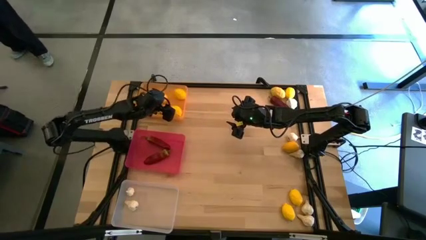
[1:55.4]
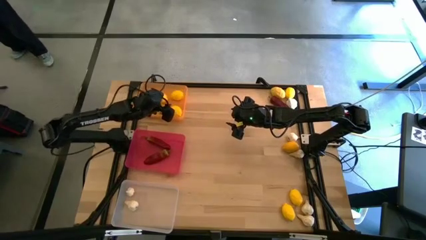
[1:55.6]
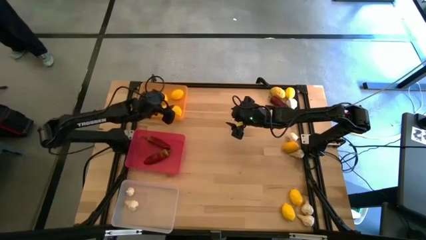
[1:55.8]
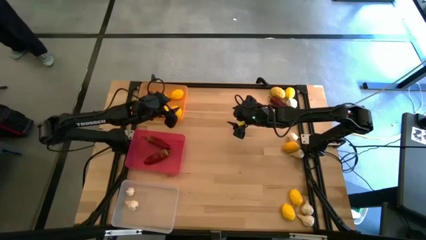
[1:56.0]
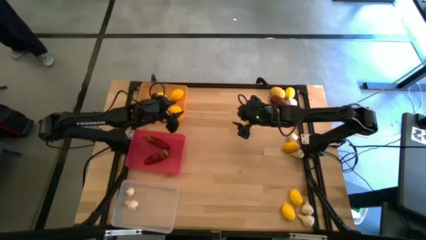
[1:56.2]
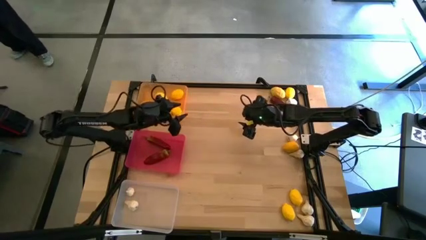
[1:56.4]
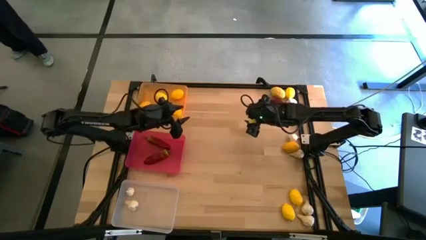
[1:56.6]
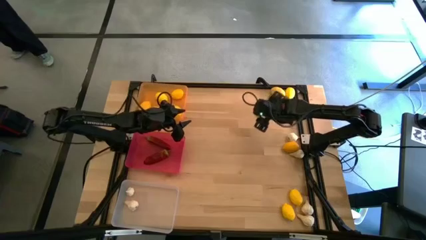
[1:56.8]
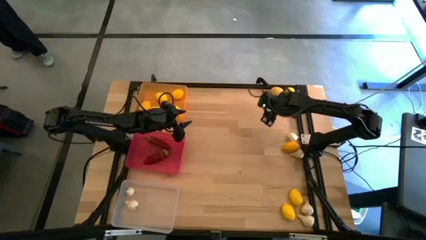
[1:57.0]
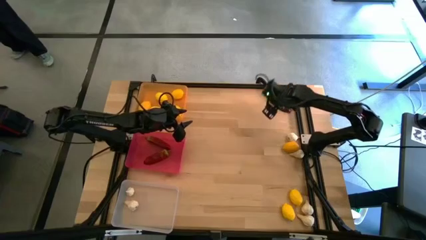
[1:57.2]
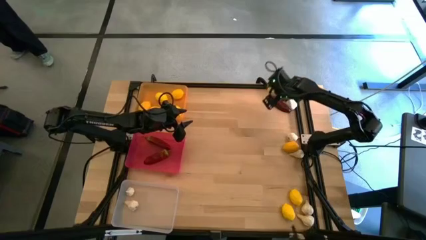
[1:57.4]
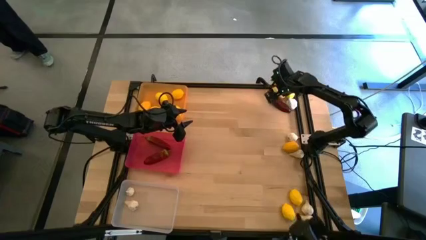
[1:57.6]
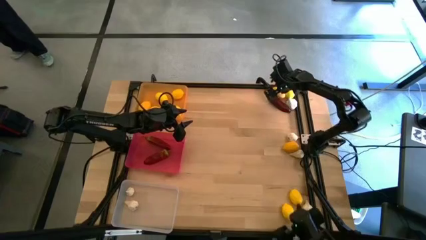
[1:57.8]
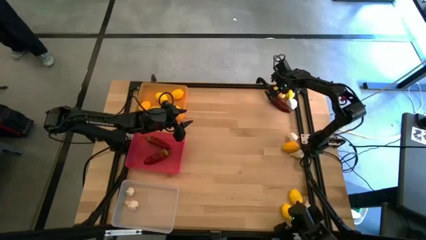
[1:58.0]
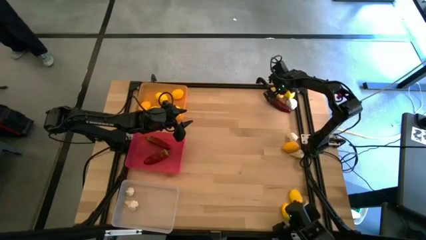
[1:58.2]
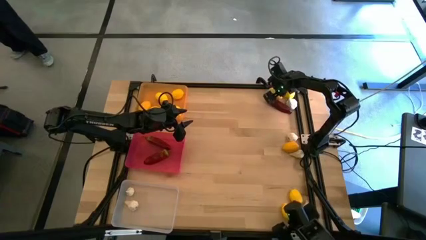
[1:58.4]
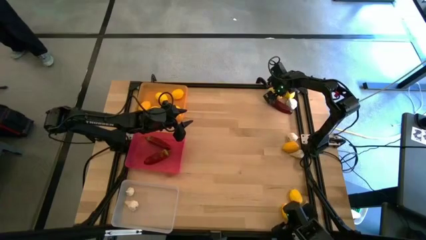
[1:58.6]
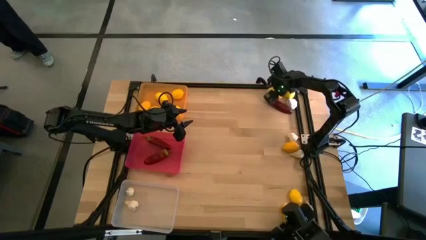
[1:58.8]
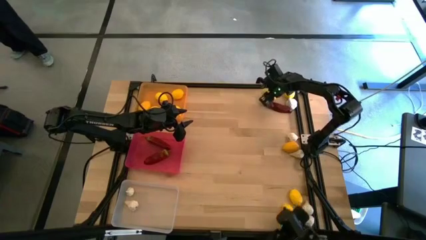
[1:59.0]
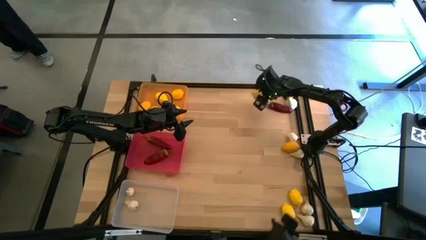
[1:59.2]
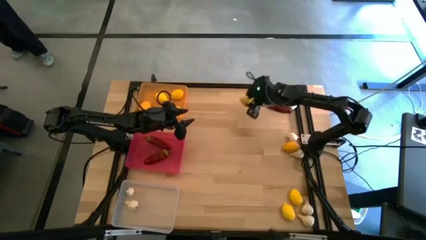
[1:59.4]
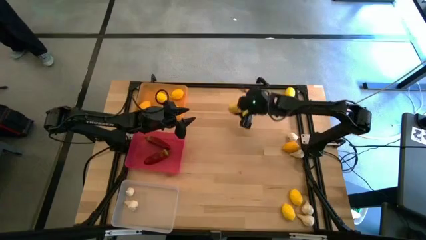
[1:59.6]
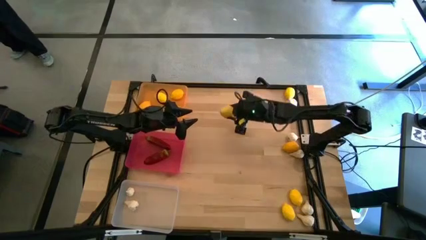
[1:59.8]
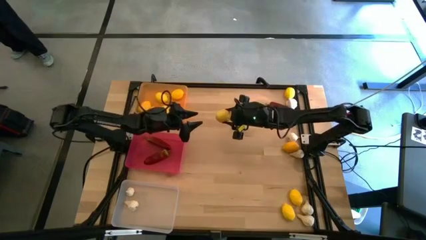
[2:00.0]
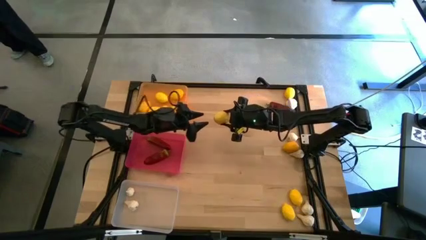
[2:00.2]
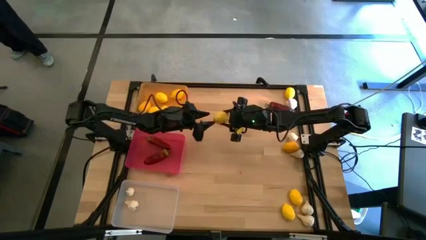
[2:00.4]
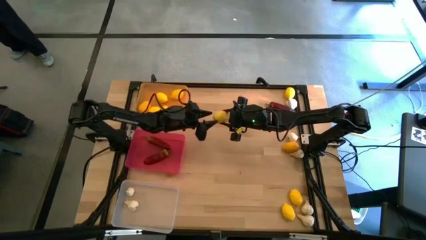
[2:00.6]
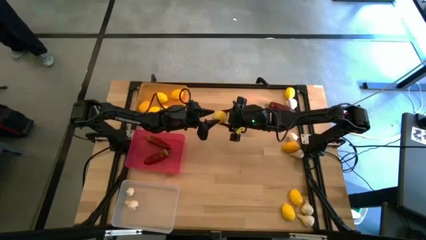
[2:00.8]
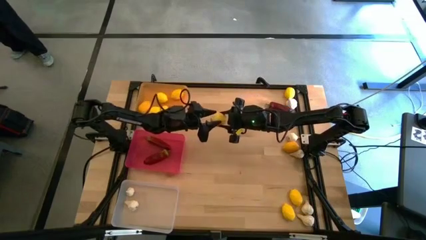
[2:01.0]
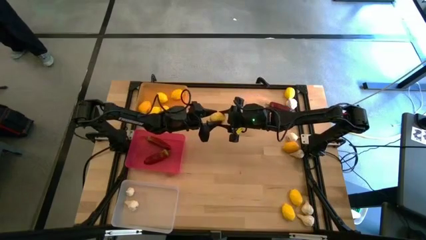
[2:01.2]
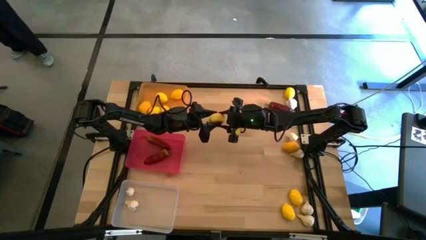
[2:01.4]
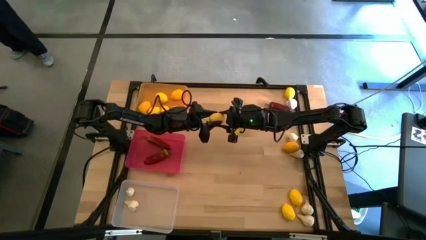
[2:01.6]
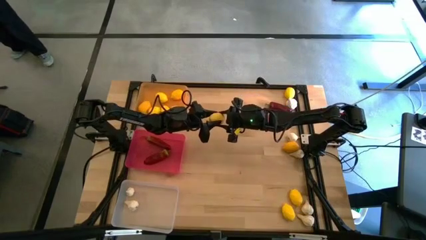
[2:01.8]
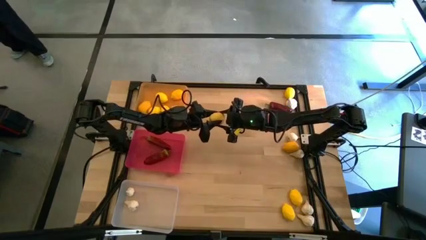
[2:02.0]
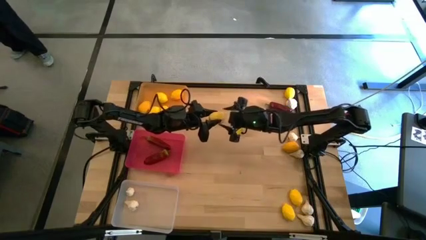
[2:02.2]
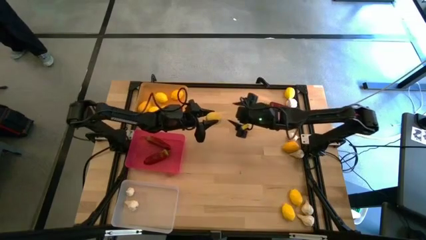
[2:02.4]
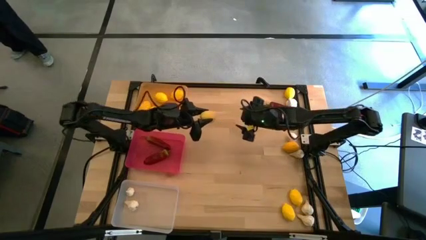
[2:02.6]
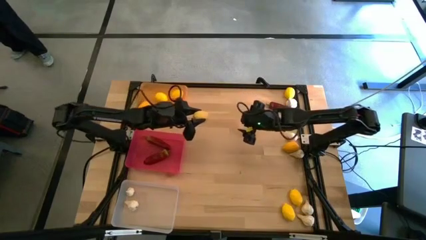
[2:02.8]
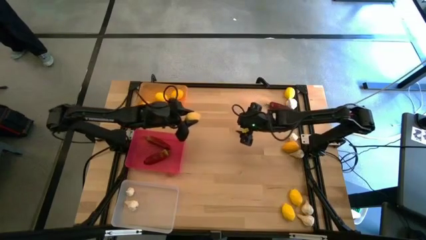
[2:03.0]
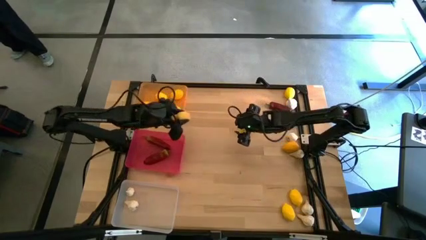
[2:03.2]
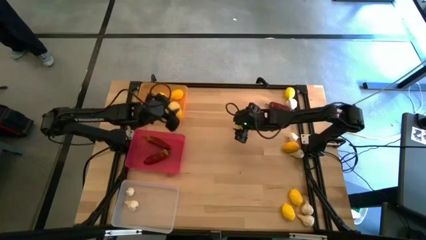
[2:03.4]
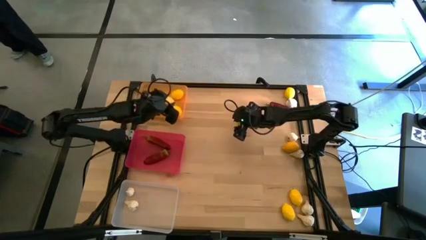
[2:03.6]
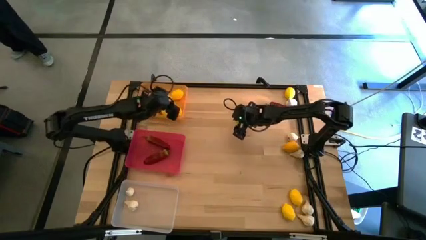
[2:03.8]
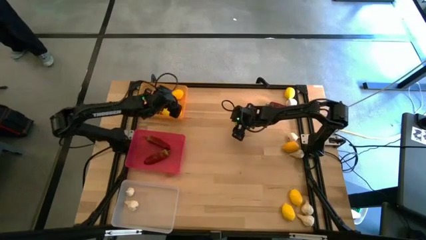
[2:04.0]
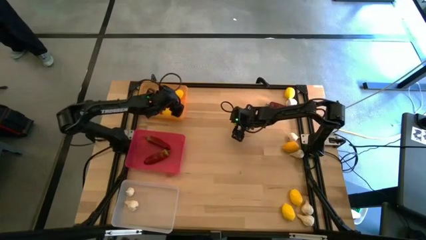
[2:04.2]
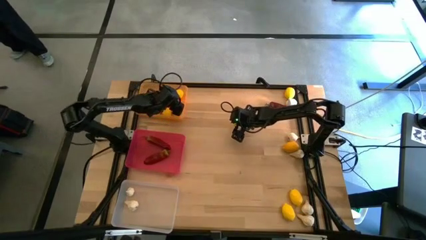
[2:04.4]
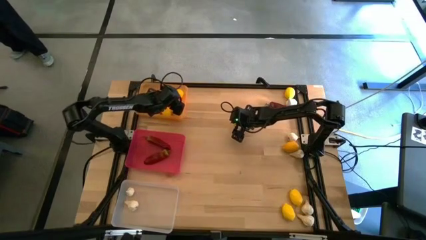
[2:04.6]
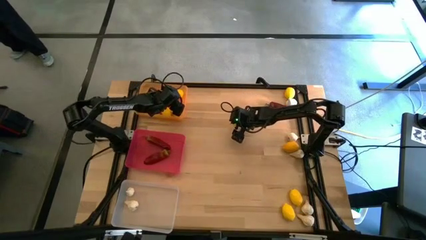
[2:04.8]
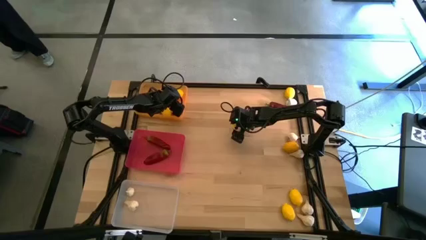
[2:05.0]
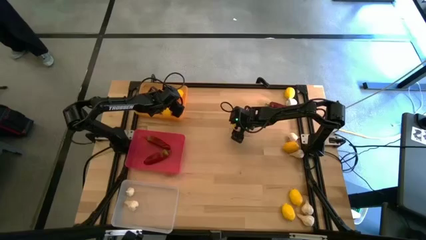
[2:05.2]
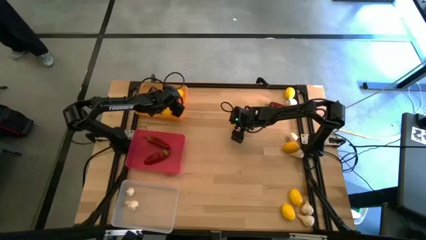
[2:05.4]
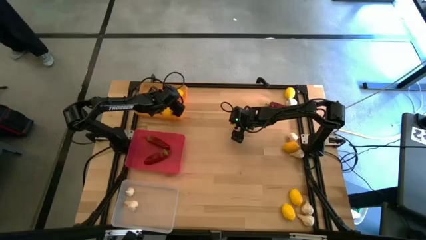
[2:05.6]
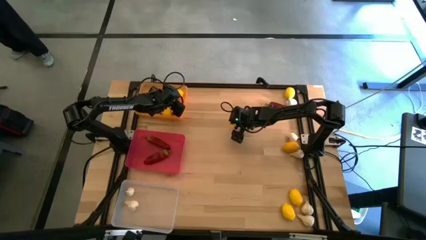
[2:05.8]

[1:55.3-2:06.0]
Task: Sort produce into baskets
Put the lemon into the yellow bin

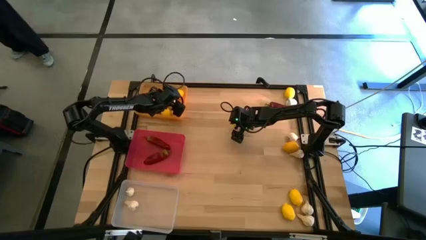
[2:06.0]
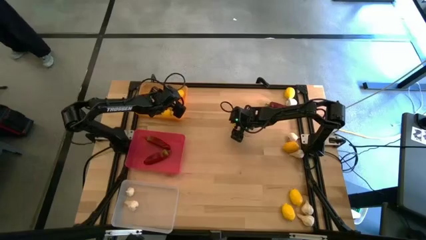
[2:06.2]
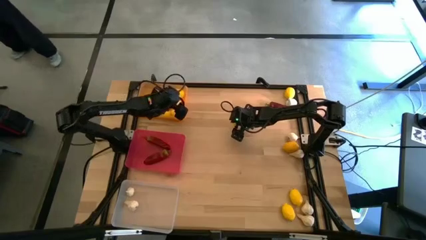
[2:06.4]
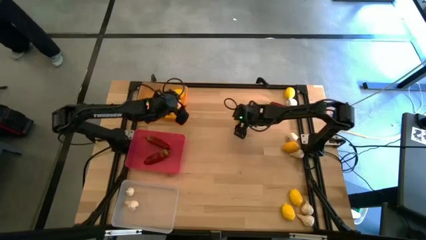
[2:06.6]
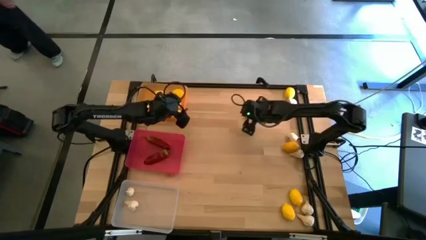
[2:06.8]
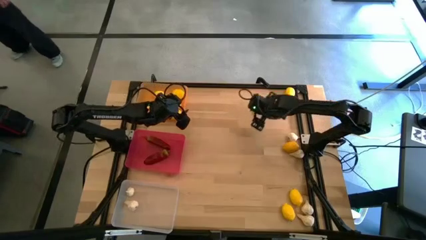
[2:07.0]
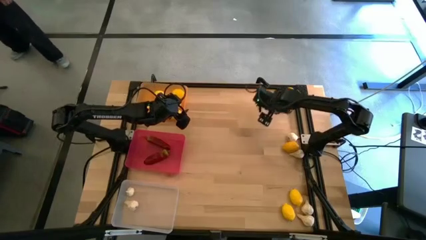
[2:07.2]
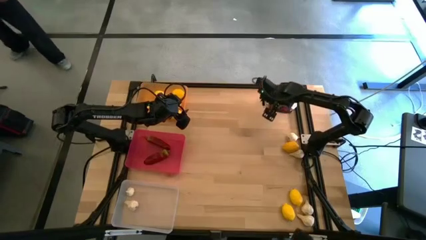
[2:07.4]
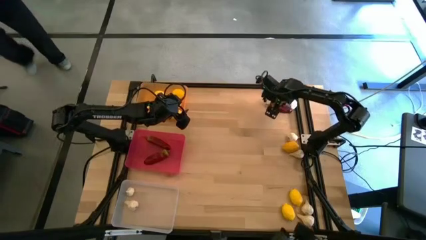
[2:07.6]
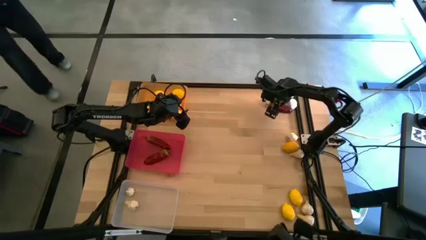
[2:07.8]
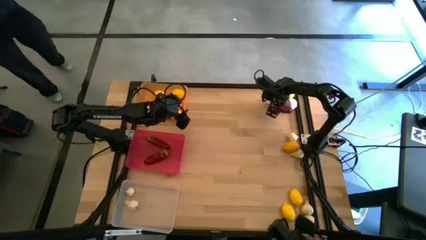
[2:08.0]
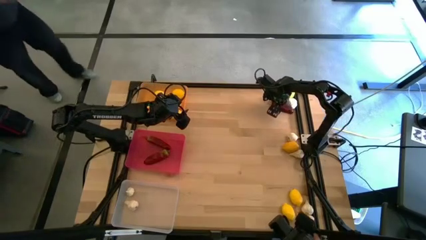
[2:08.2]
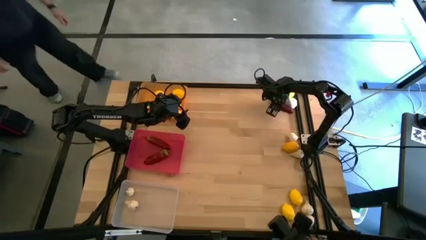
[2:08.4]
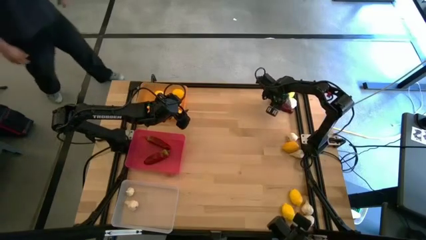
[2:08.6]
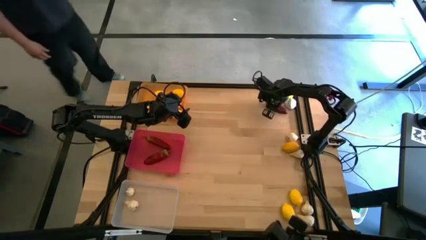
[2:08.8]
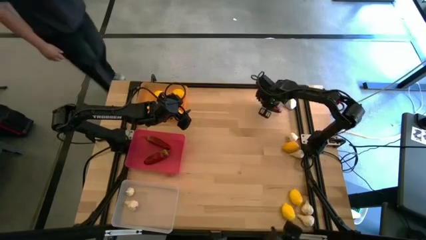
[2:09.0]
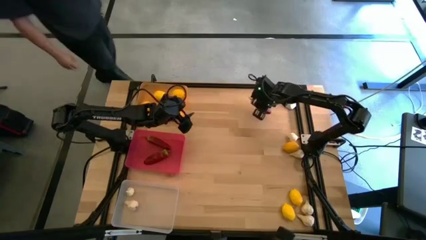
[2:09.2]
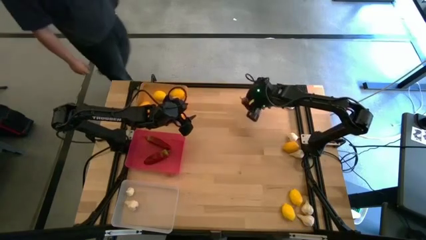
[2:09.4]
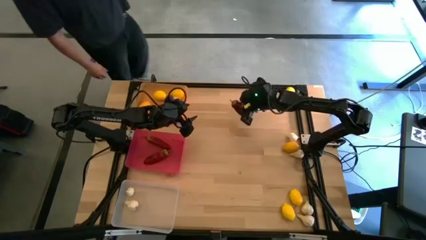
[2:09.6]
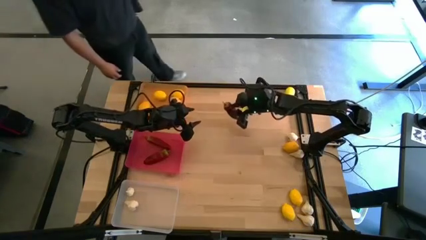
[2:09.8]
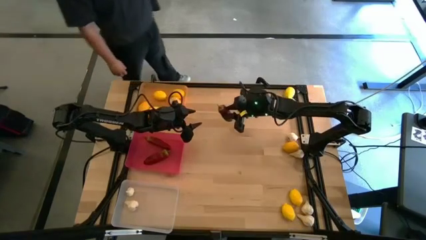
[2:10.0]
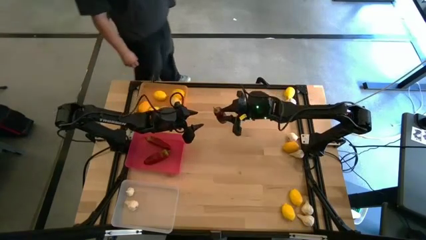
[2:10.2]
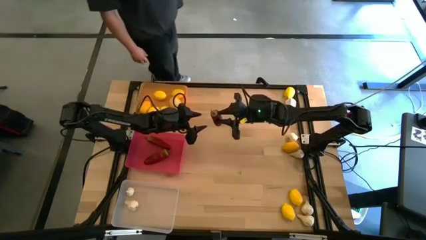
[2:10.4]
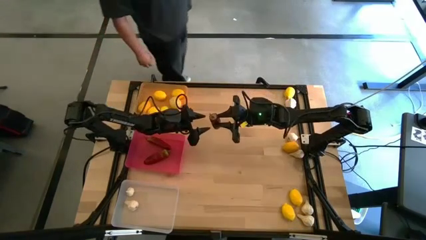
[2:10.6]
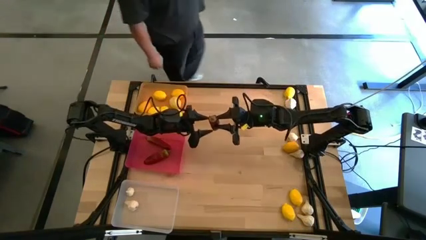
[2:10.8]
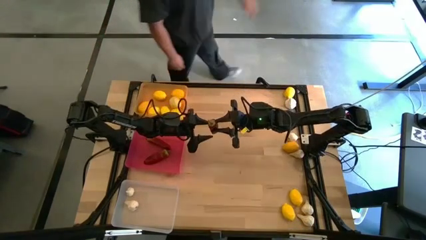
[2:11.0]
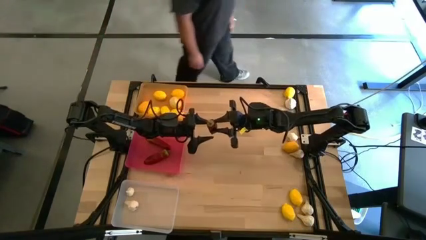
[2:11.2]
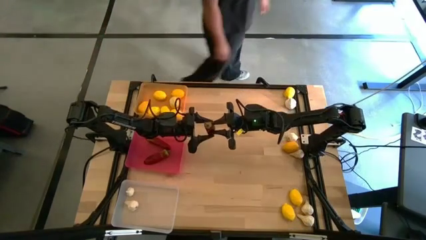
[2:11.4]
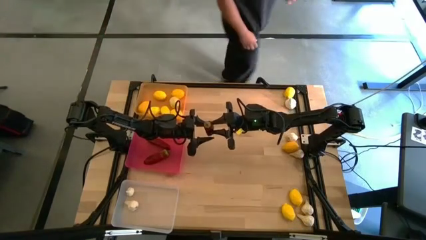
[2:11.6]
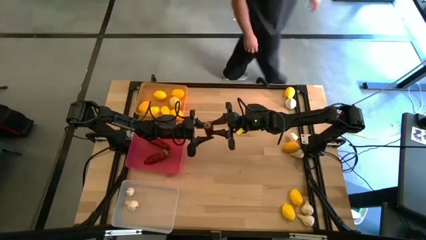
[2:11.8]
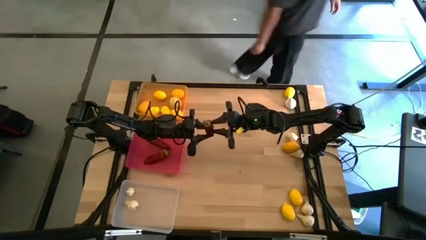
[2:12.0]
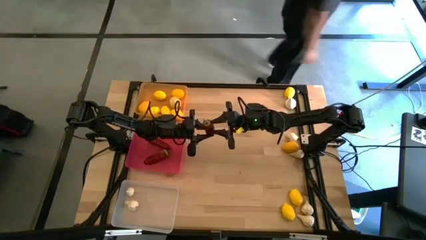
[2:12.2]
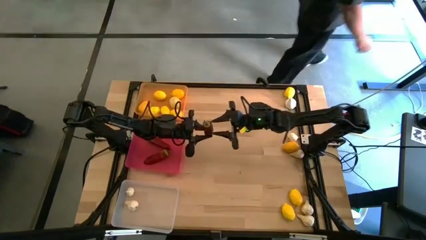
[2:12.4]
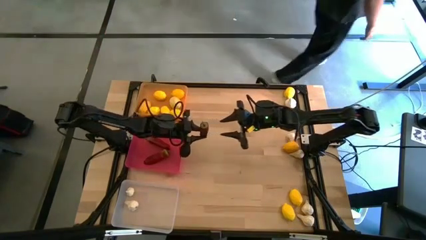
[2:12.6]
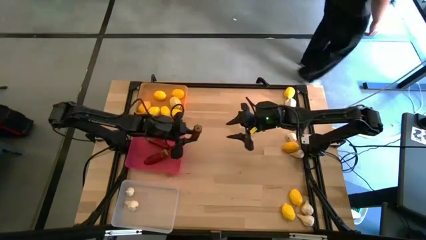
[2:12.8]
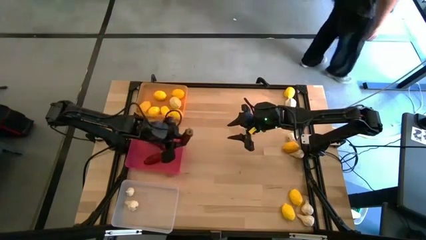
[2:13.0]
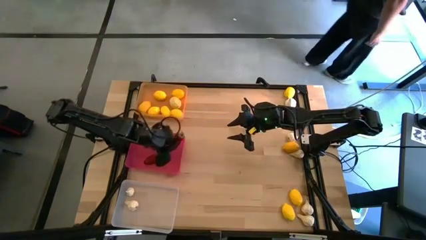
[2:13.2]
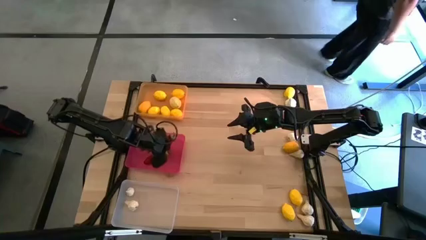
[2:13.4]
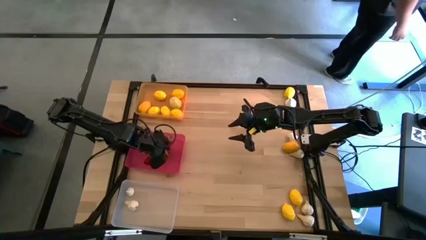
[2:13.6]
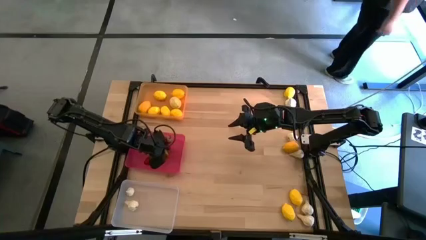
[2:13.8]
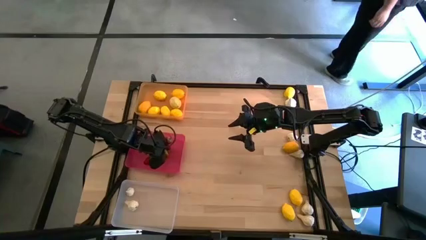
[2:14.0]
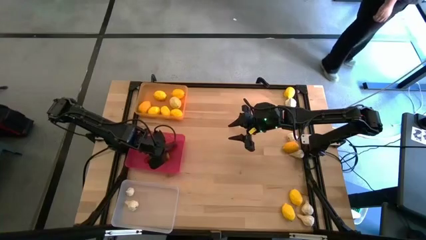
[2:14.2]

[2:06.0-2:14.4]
Put the chilli pepper into the pink bin
